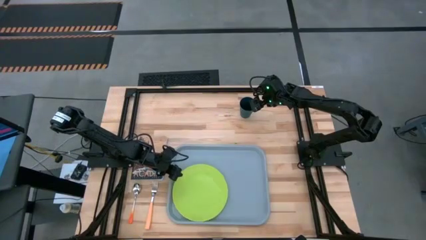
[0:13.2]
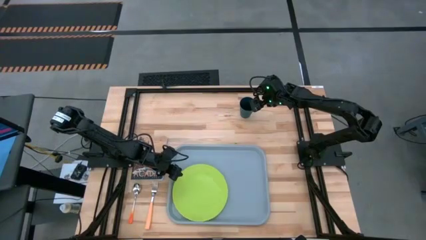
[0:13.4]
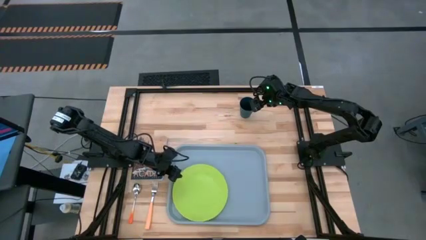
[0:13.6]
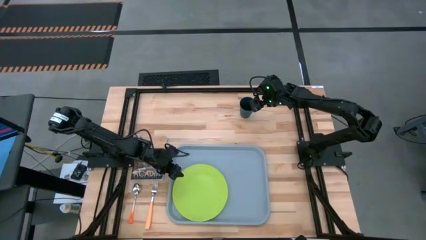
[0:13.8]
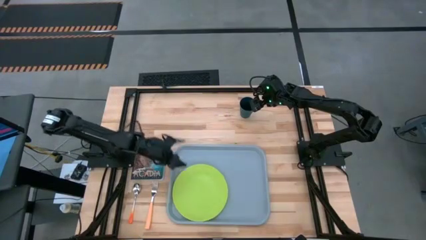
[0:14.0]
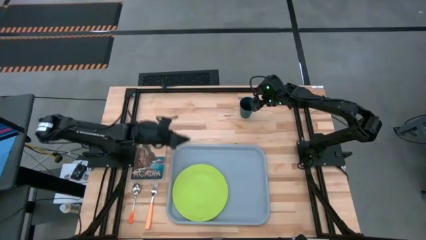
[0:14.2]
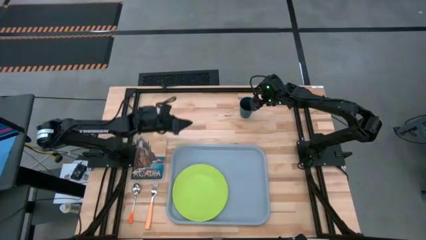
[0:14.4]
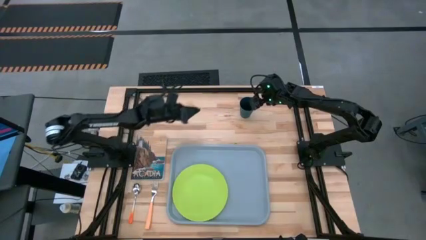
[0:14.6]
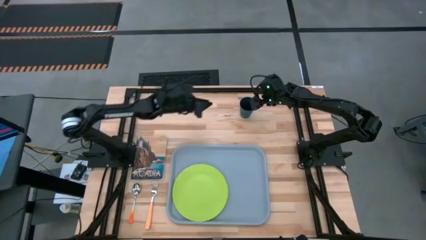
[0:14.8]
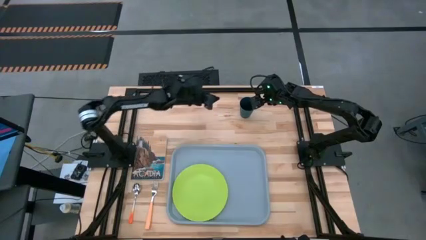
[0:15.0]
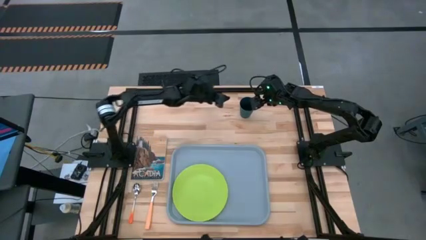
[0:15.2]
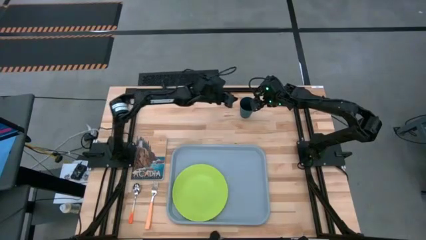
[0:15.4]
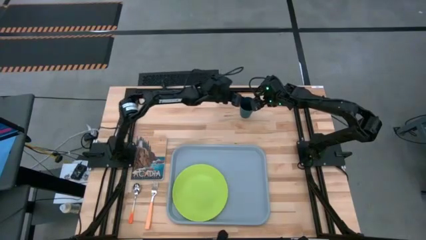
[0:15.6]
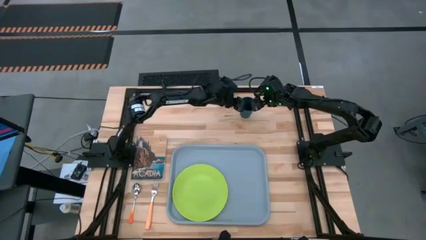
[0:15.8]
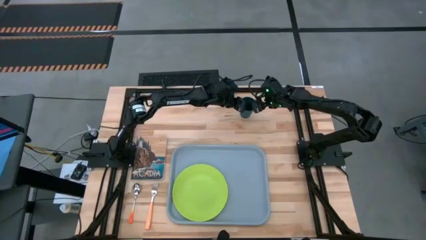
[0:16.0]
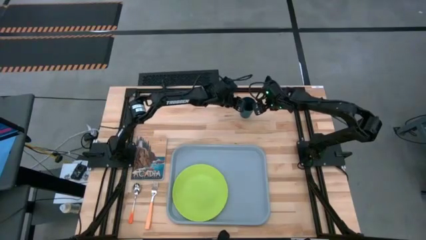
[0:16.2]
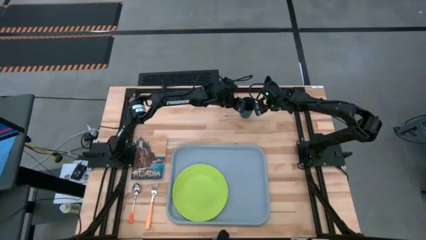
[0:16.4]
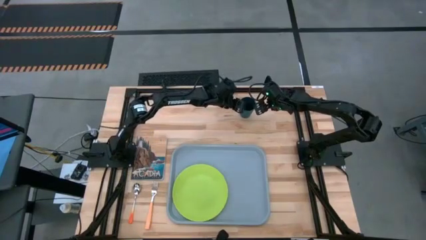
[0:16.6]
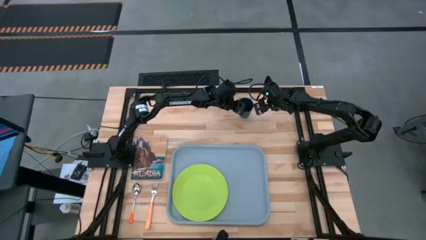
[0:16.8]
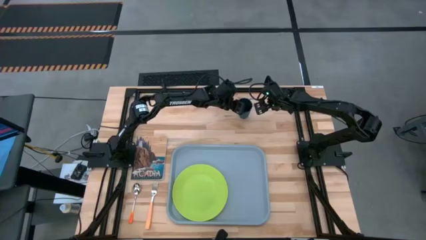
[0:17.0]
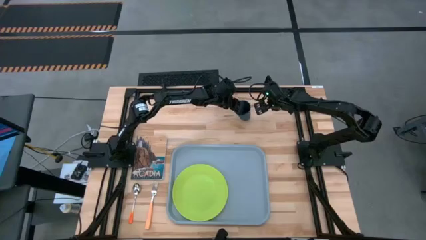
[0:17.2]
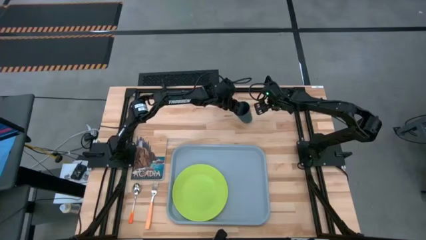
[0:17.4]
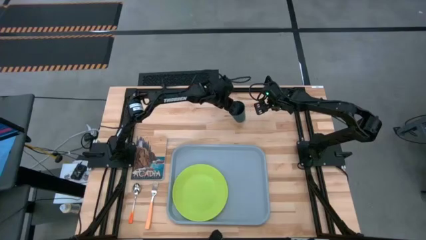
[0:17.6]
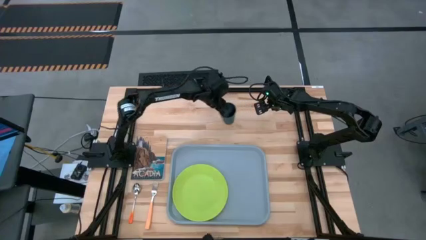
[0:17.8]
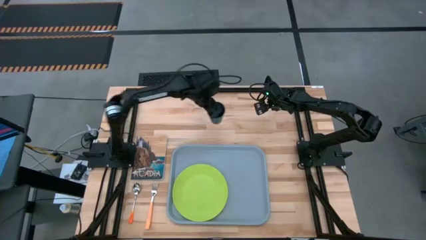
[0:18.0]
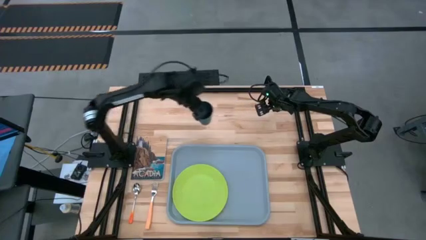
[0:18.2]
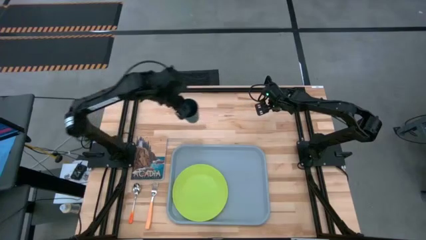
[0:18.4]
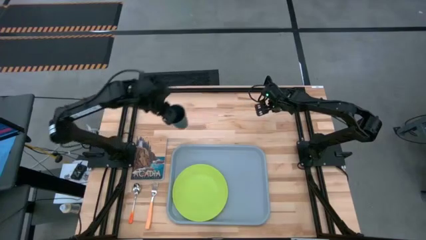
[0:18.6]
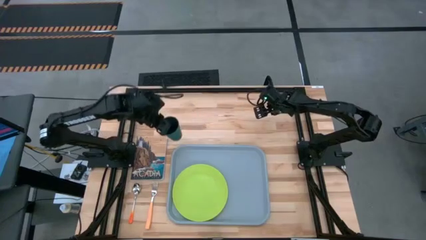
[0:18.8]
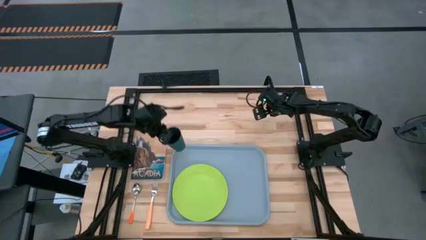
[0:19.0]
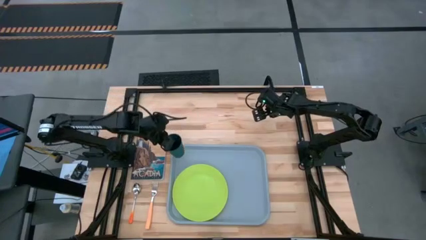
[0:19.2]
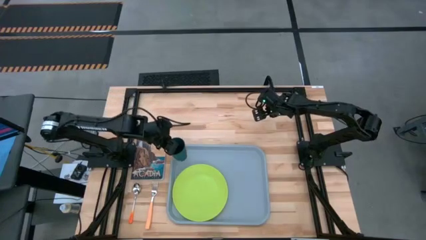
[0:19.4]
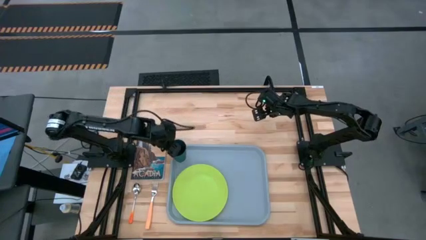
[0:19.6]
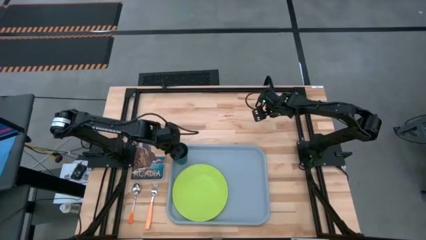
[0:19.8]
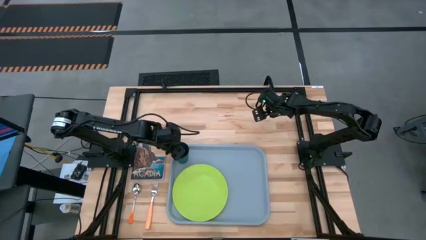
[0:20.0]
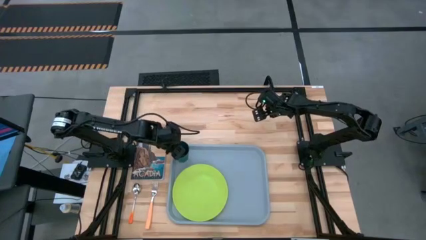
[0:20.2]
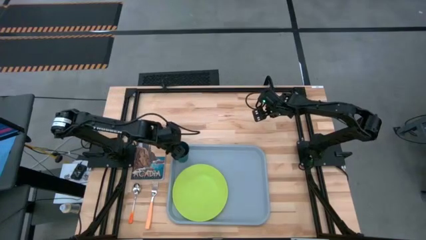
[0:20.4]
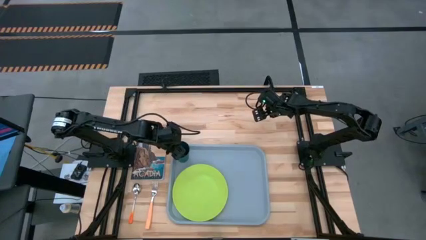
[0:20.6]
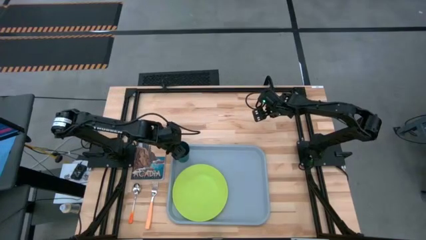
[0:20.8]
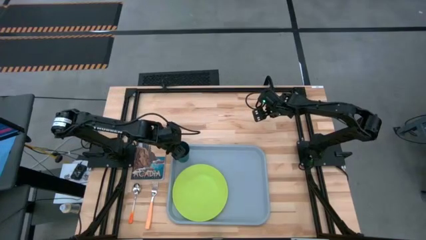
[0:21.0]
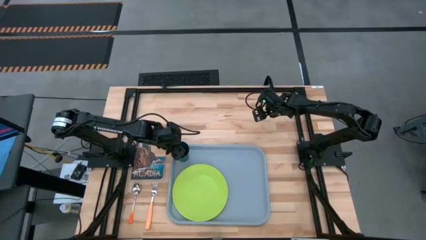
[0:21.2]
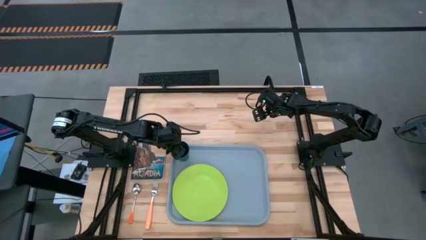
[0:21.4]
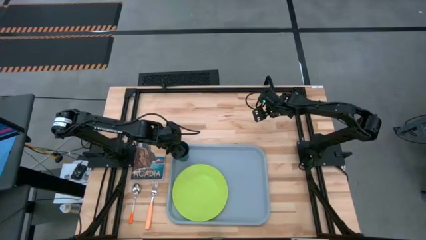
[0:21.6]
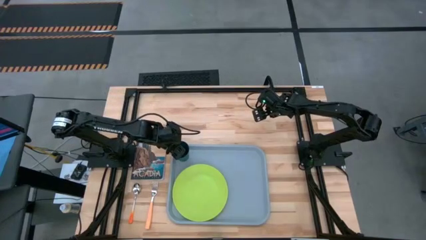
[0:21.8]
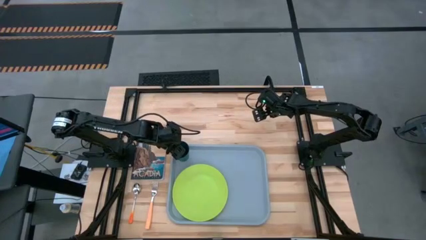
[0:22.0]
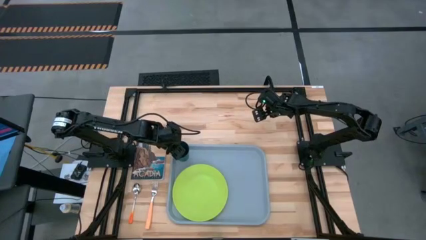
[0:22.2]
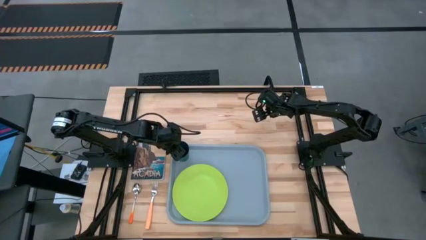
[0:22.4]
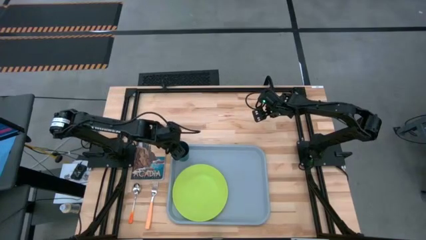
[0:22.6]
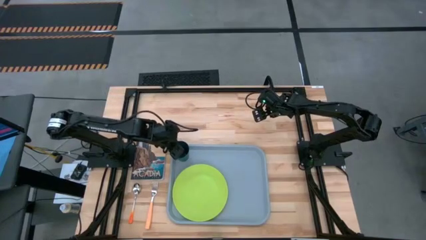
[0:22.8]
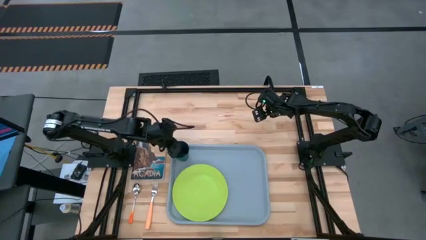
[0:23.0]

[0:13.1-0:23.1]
Task: Pick and place plate/cup/fork/spoon on tray
Put the green cup on the gray serving tray to the top left of the green plate

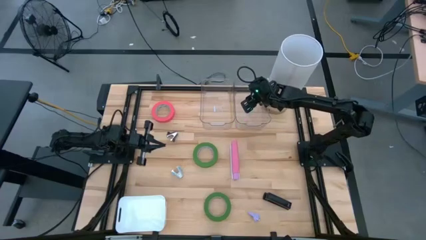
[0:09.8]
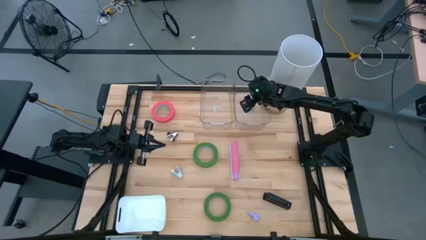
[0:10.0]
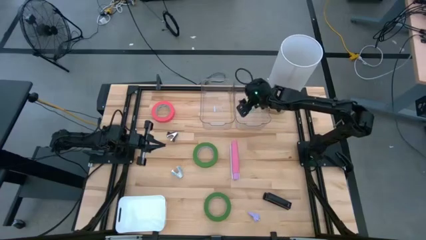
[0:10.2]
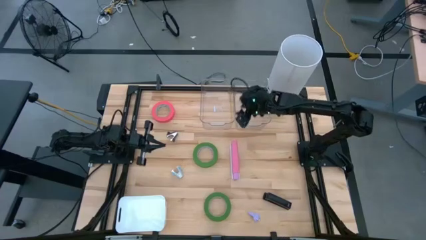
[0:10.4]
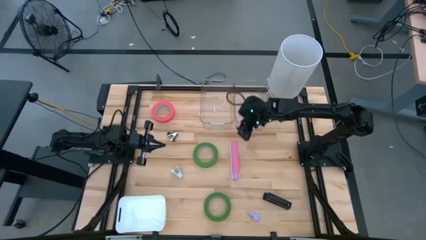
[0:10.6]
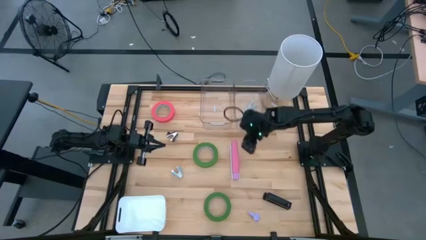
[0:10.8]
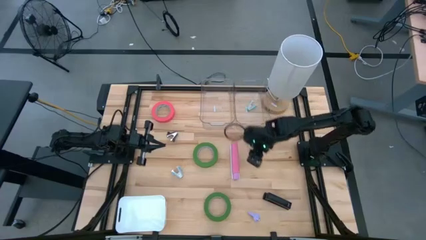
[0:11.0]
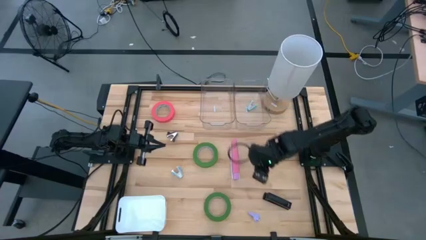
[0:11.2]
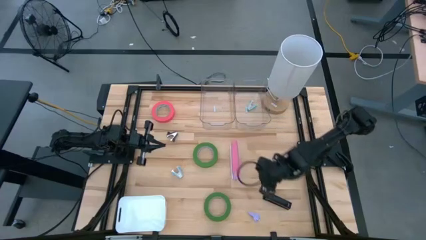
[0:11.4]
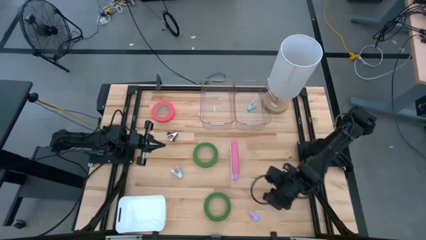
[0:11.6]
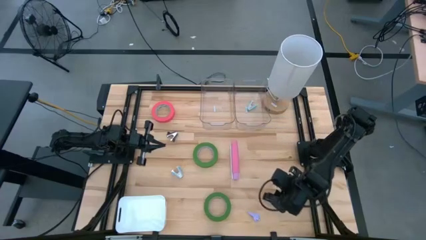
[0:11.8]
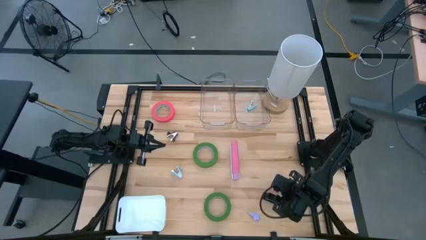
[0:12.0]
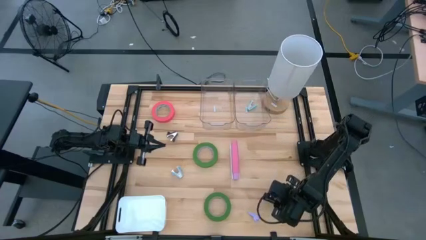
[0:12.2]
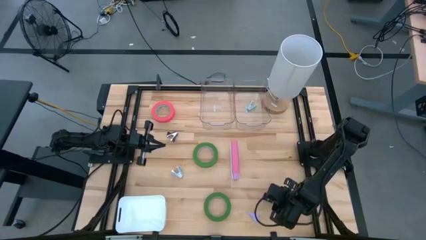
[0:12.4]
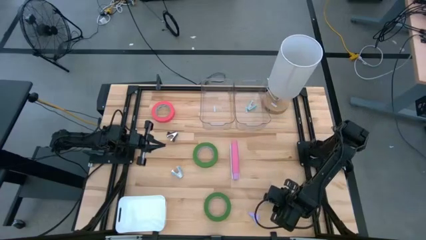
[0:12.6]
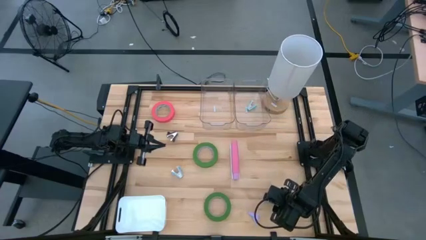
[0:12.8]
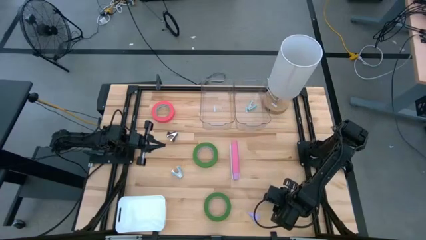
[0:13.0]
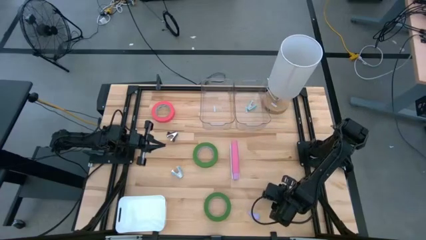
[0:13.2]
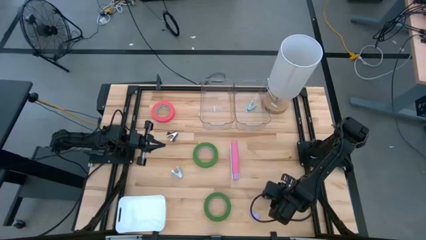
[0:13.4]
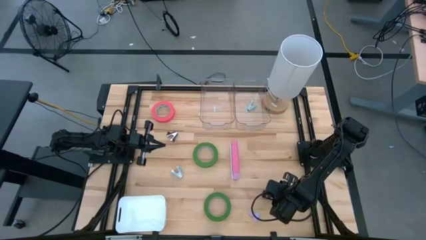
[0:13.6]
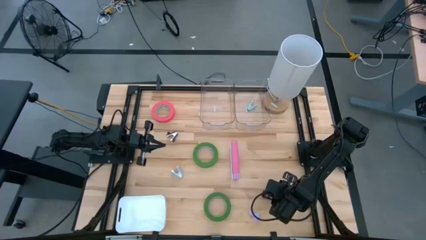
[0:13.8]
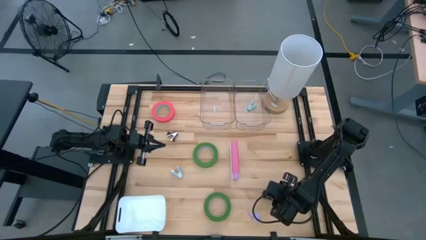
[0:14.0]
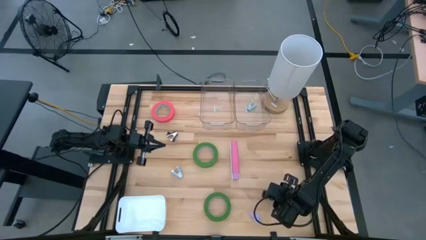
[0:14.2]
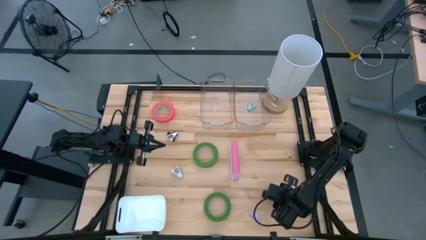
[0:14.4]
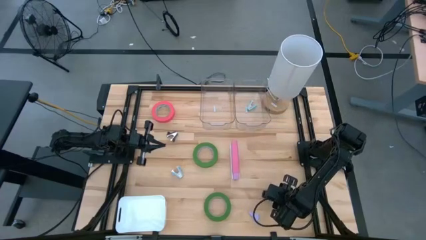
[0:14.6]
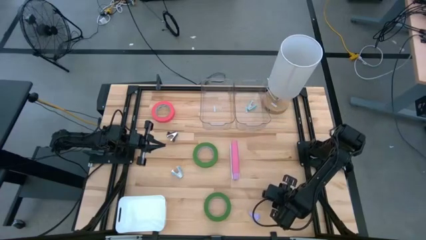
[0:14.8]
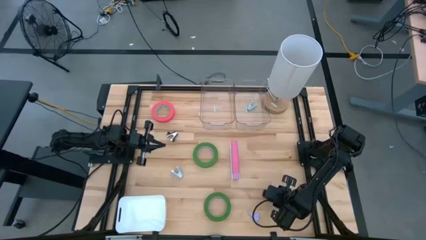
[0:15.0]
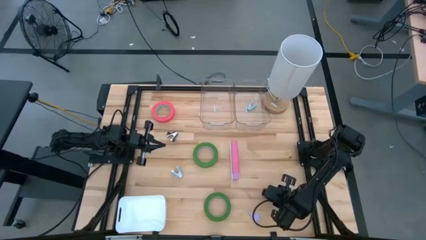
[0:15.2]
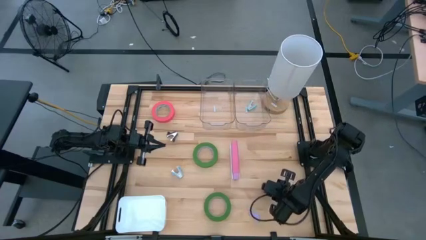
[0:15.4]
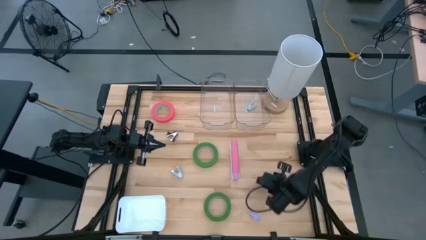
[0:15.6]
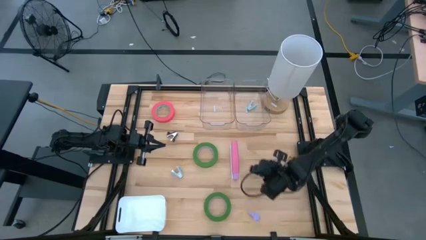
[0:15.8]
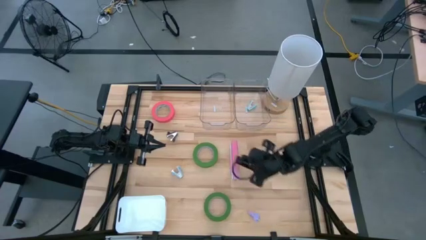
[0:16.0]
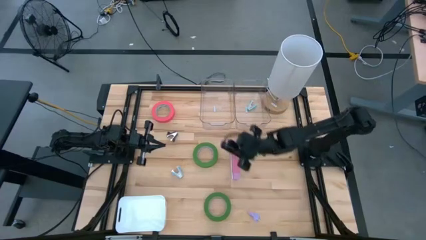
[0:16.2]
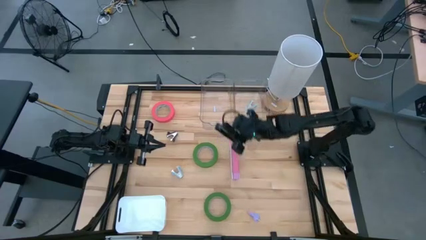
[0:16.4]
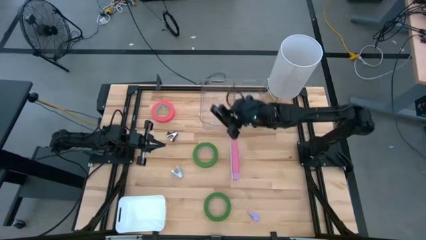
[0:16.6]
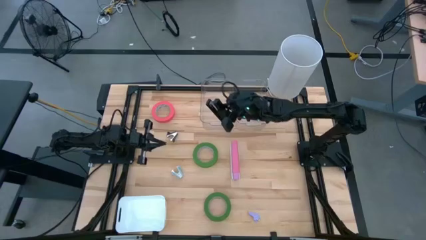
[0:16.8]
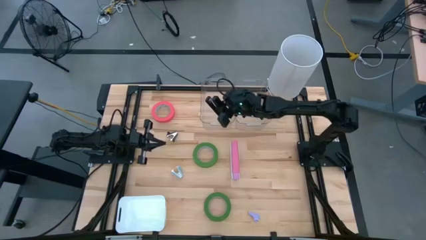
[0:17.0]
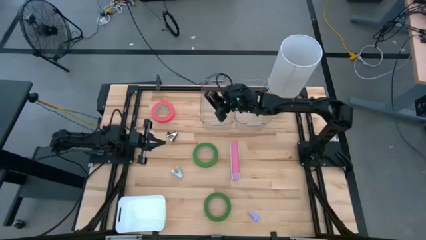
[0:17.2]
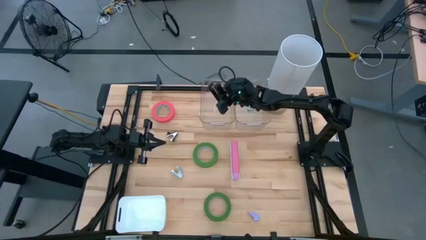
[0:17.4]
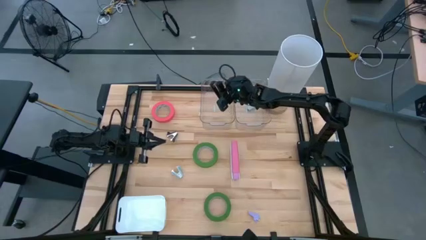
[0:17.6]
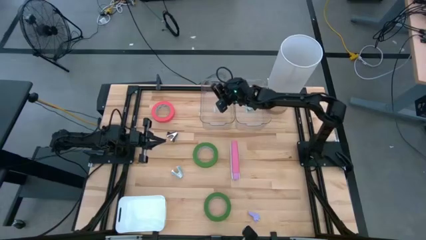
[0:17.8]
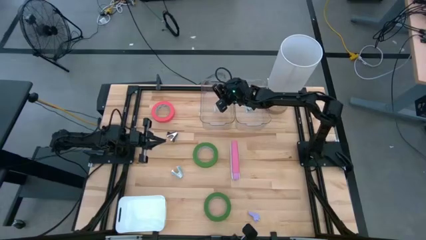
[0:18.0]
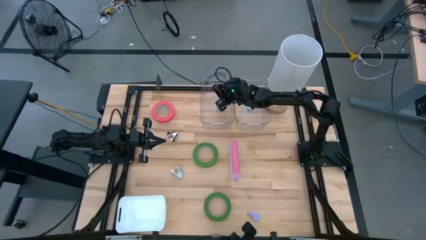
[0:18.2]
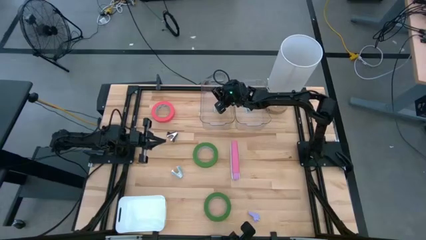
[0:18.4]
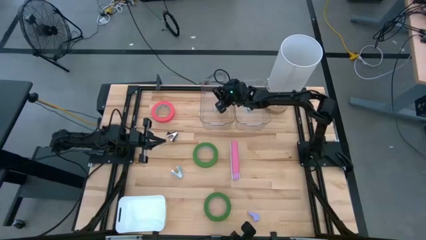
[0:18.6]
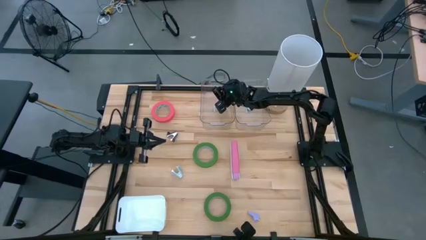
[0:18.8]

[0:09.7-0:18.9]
Task: Pick and place Stapler, Stapler remover, tape
Put the black stapler into the left transparent bin
